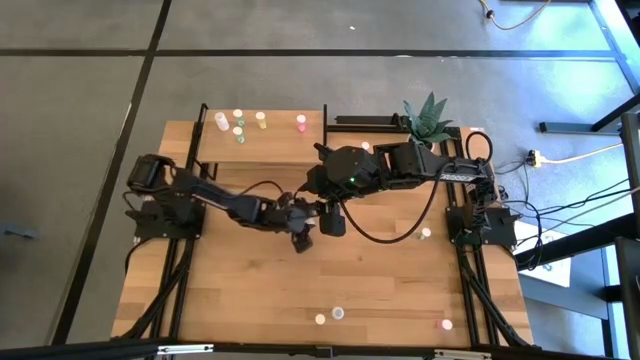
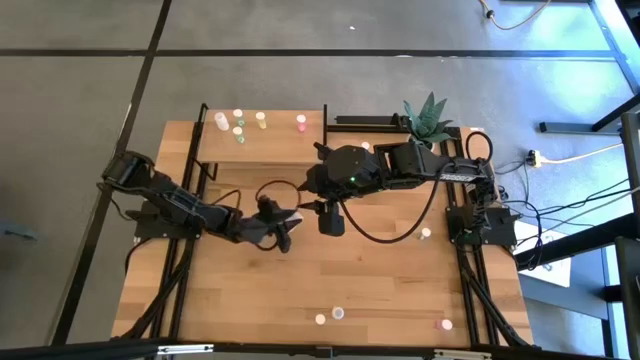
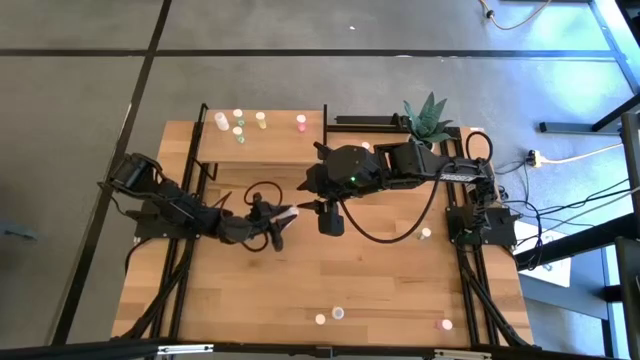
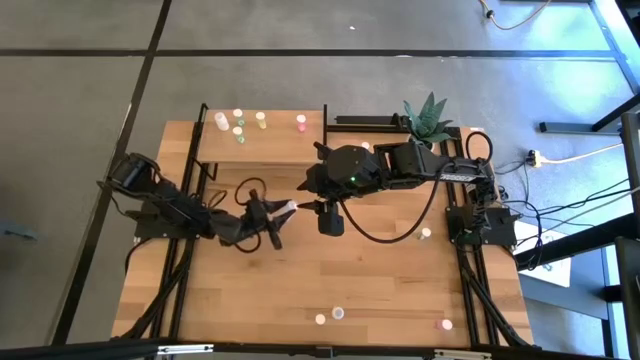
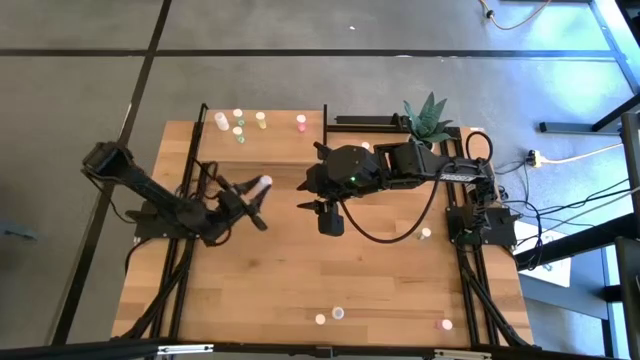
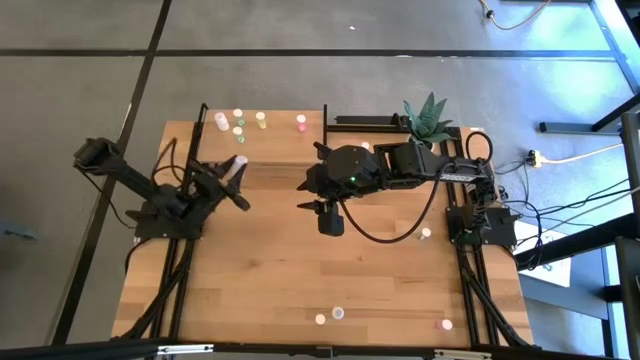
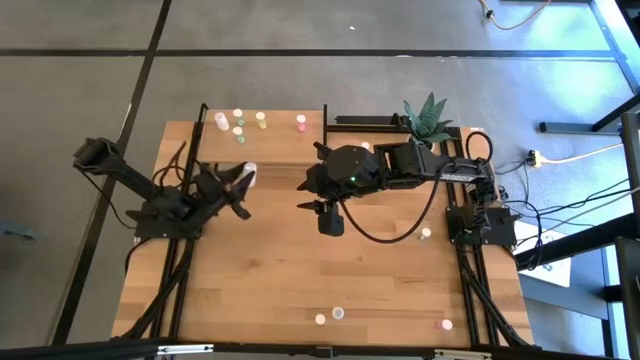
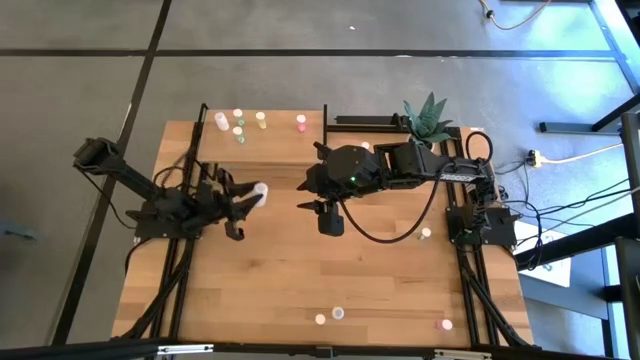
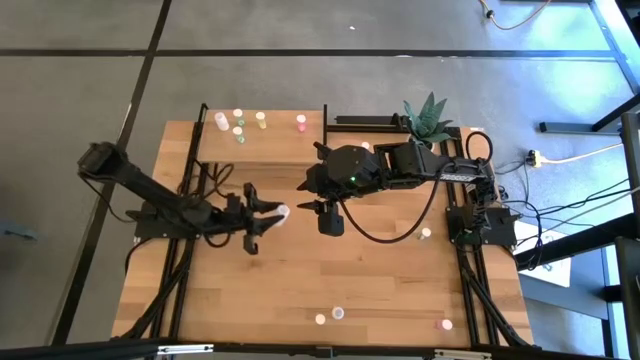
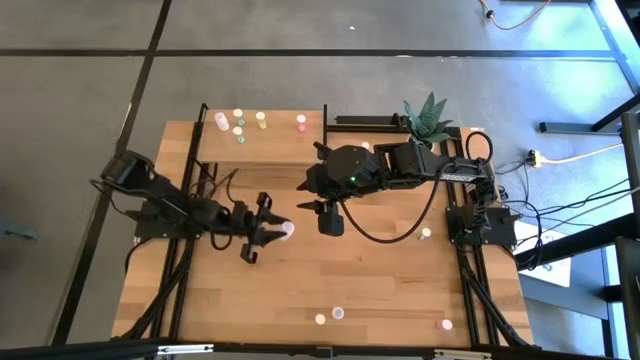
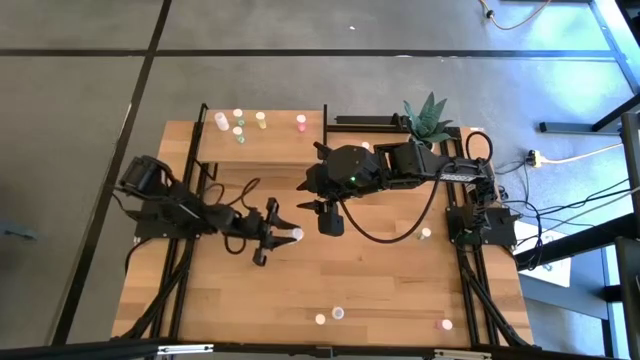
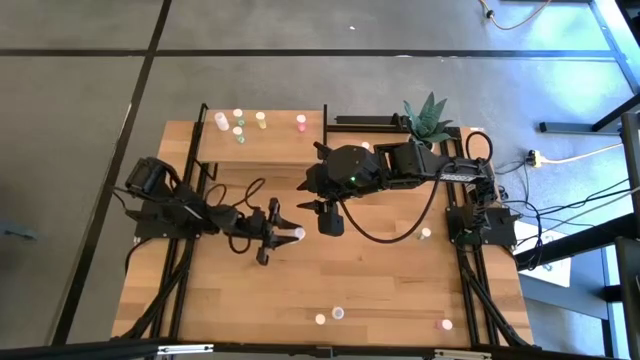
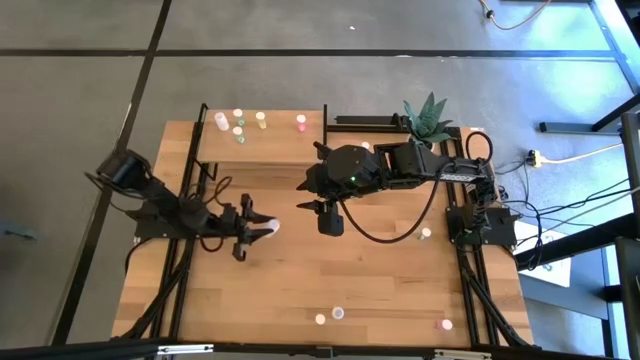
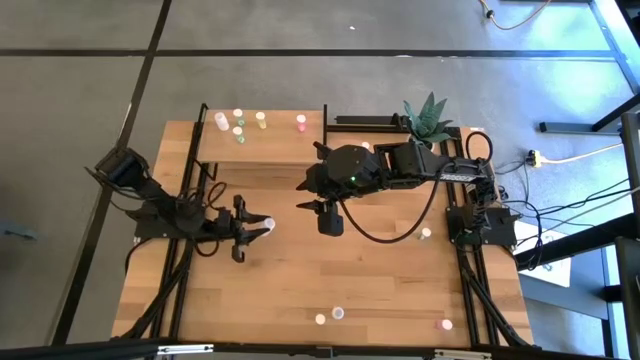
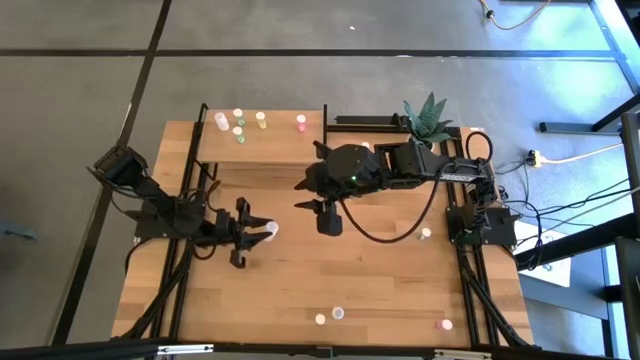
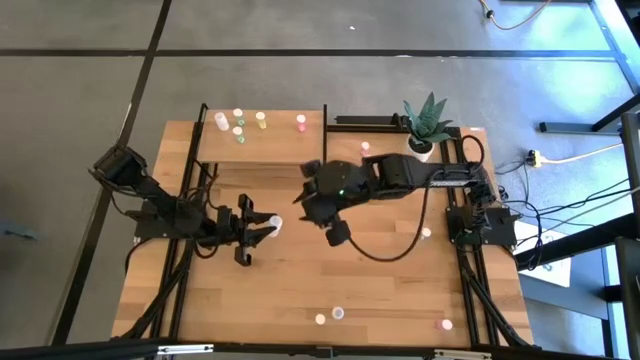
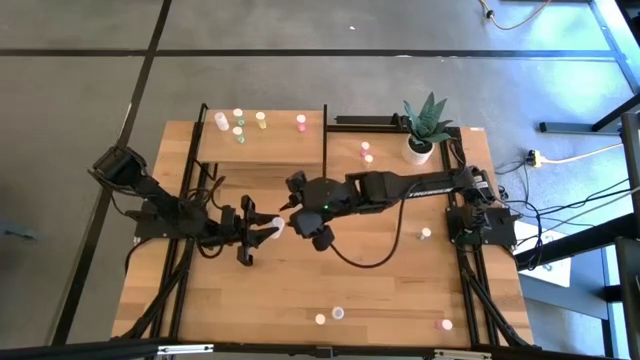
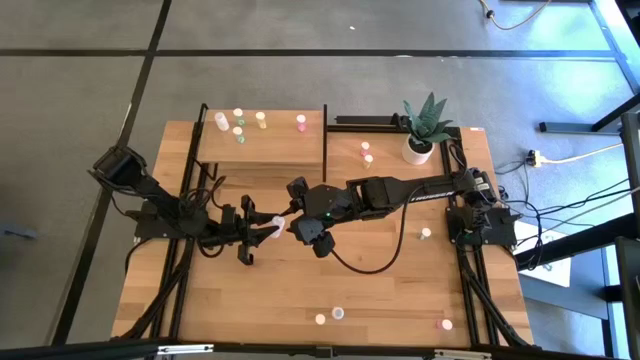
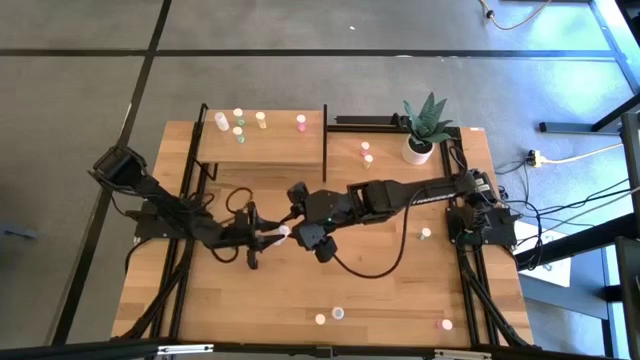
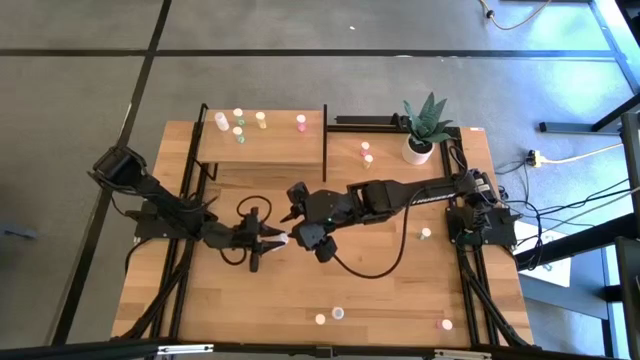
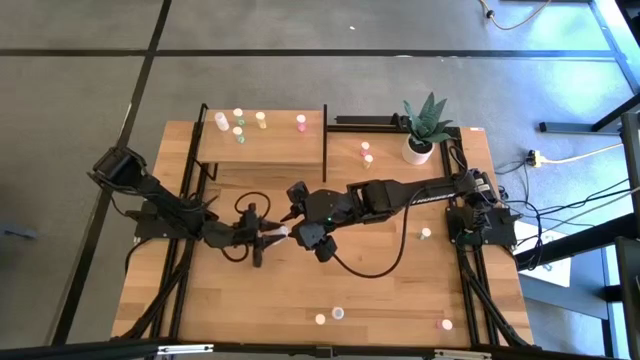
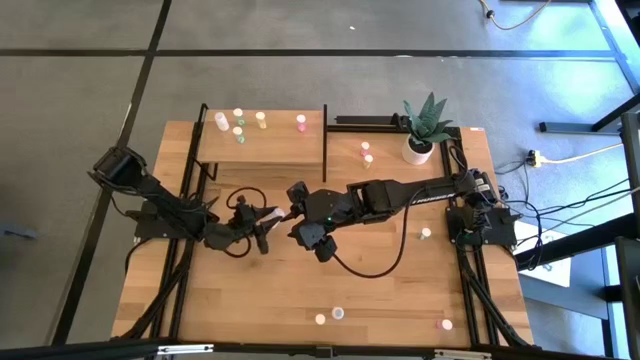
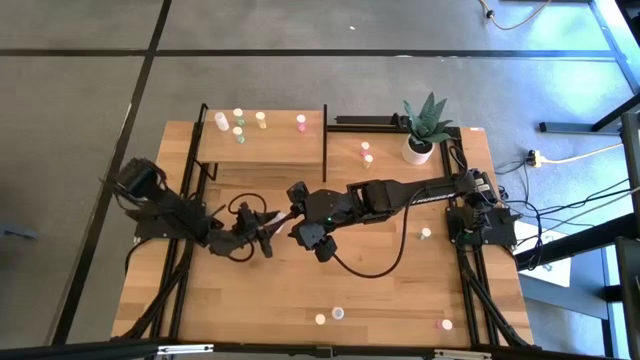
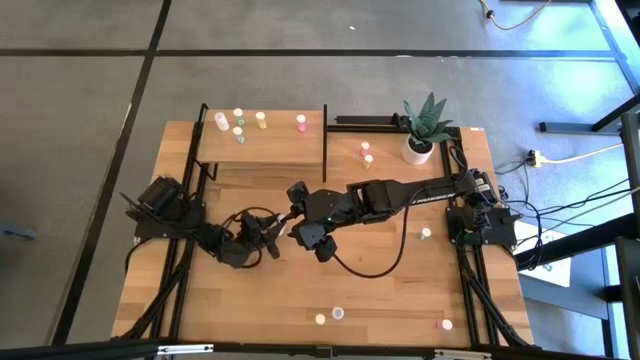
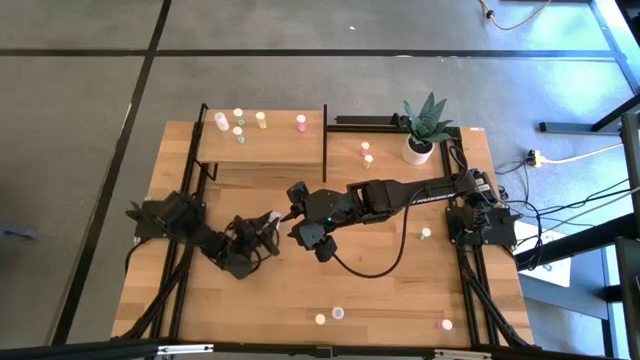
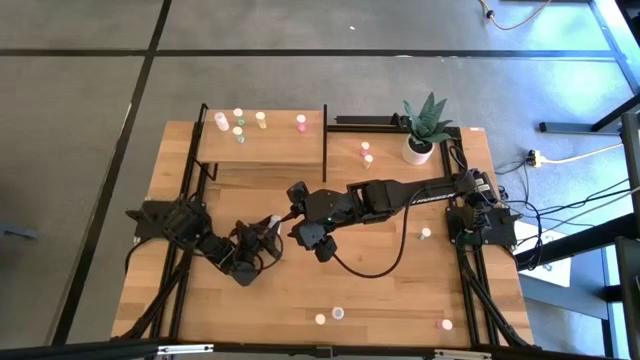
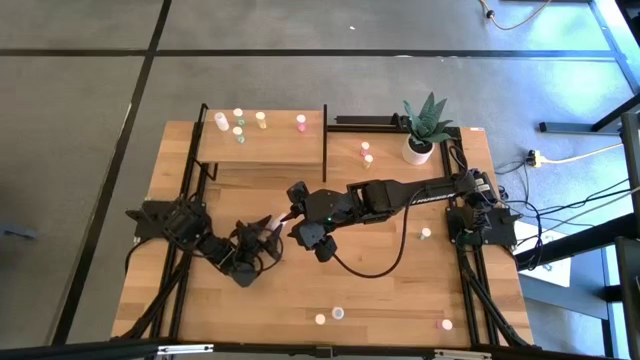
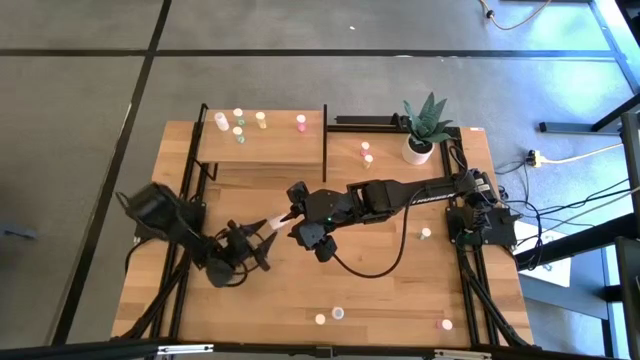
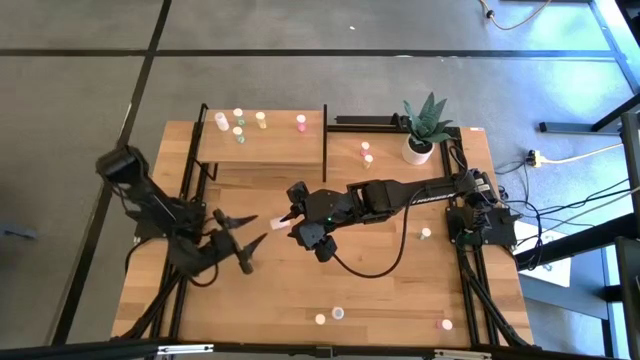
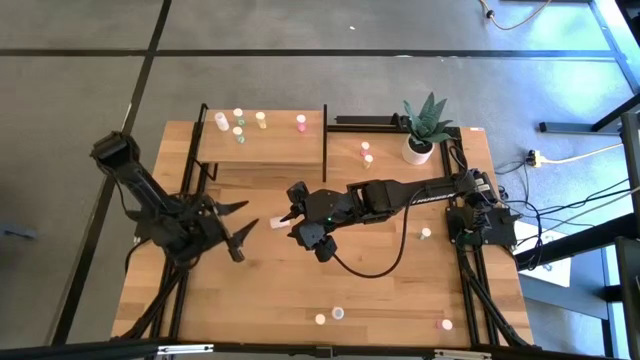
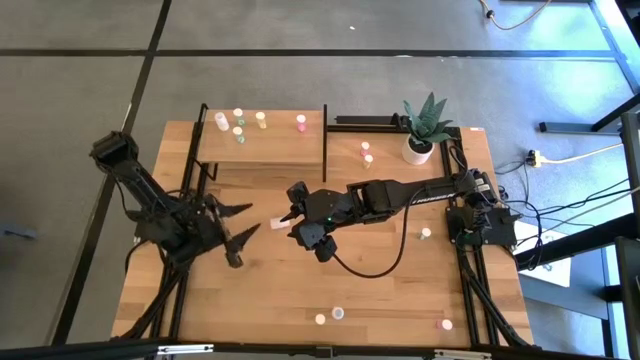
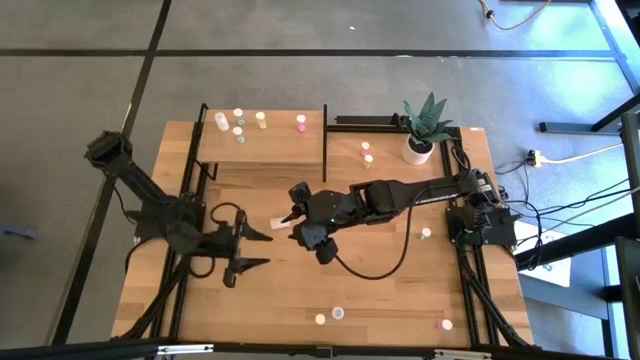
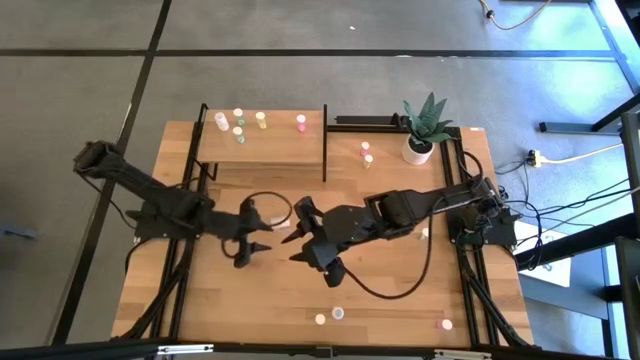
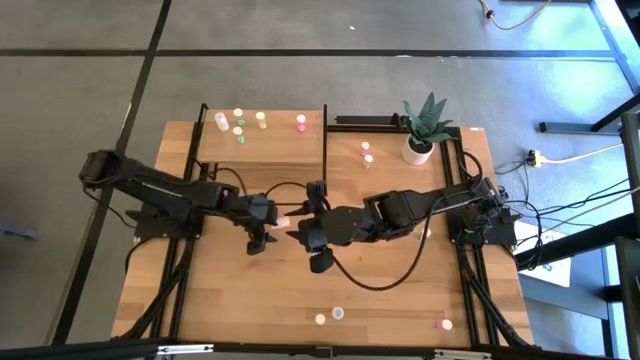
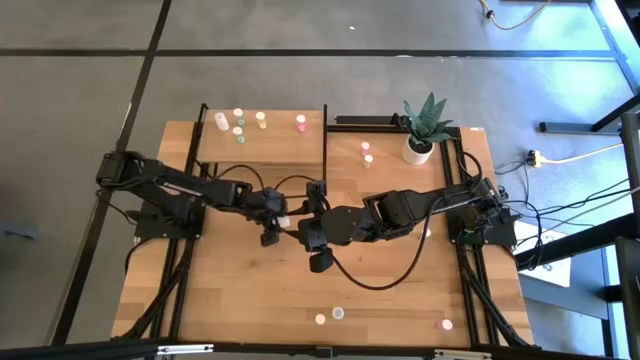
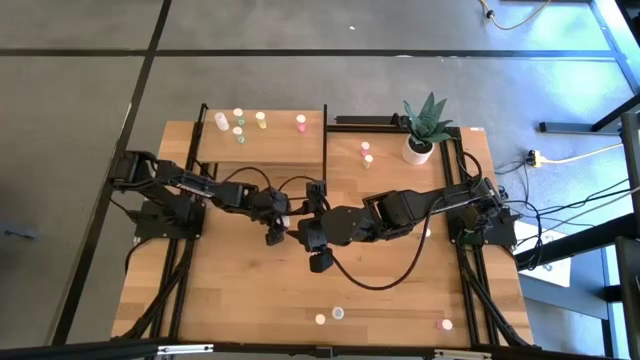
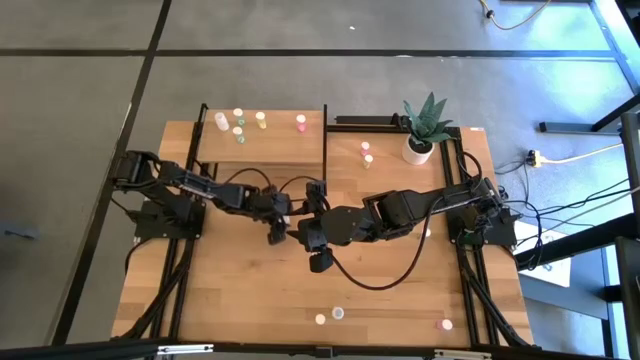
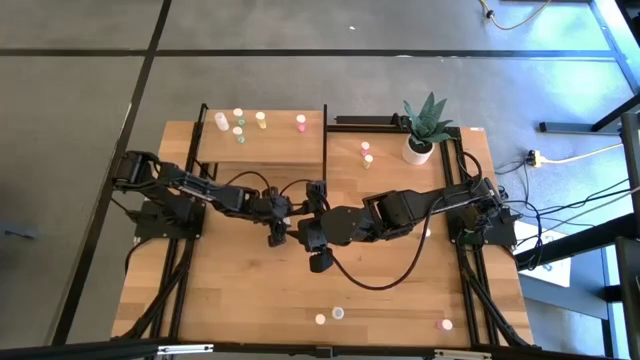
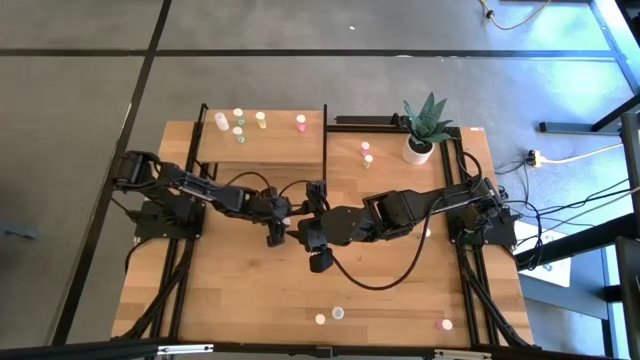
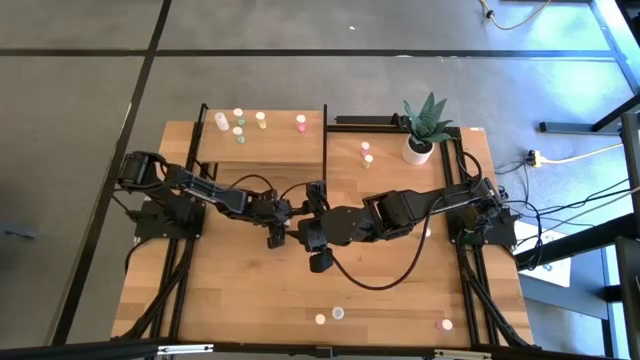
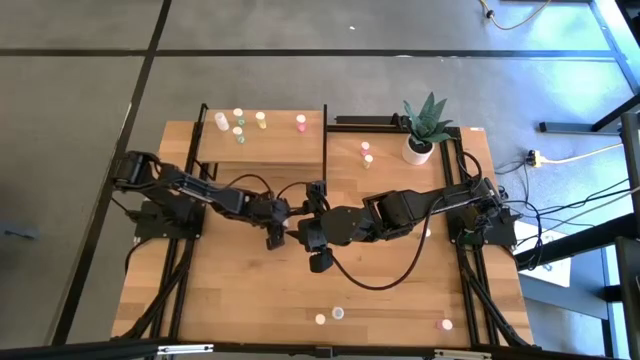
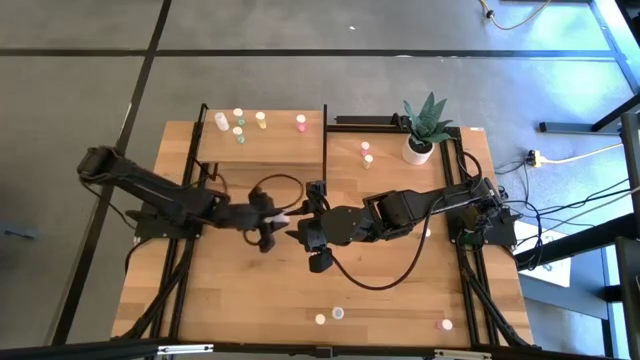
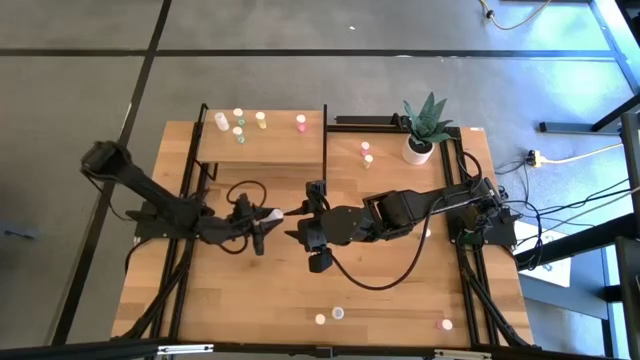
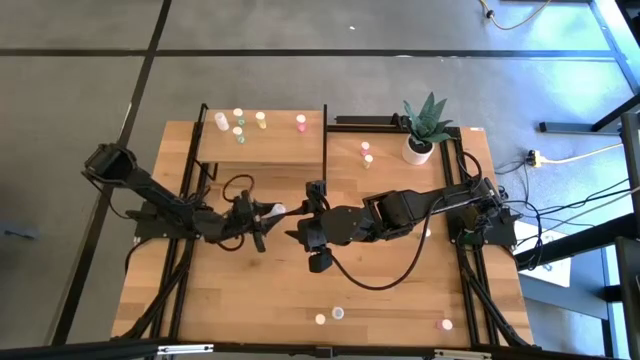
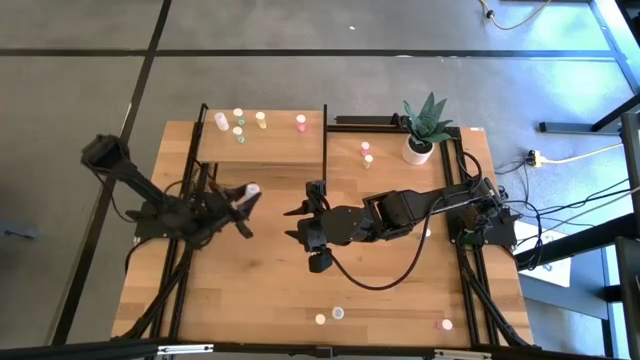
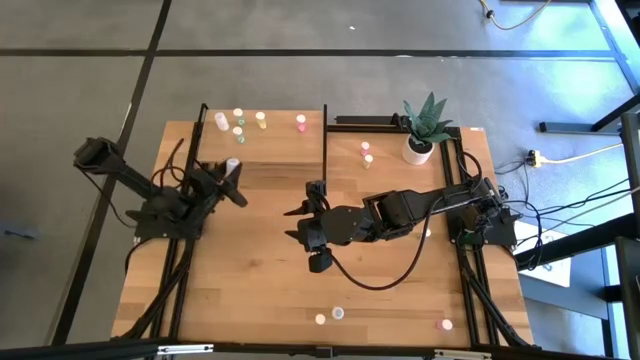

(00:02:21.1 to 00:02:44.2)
Task: Pick and place medicine bottles onto shelf by color
Put the top white pill bottle aligned with the other white pill bottle on the shelf
